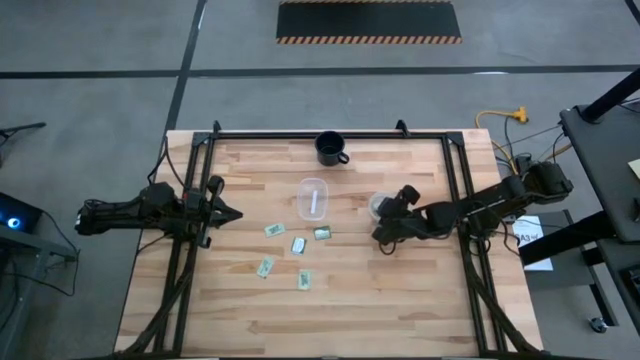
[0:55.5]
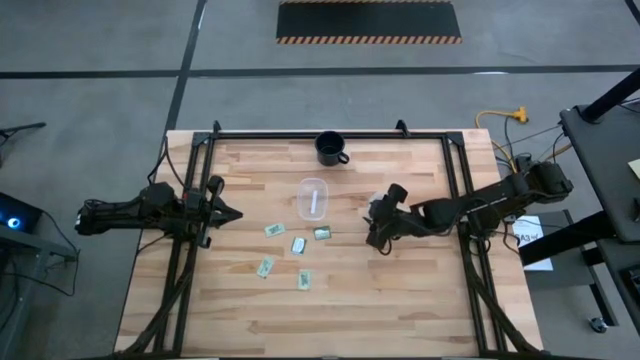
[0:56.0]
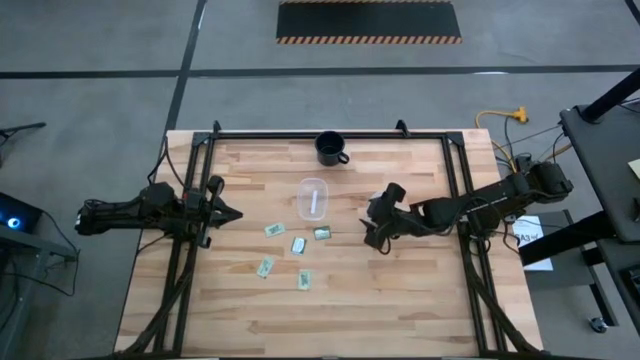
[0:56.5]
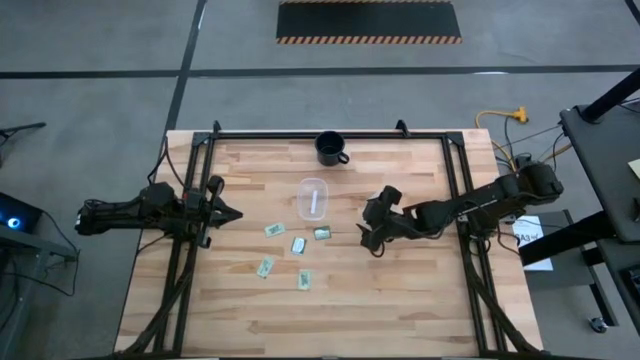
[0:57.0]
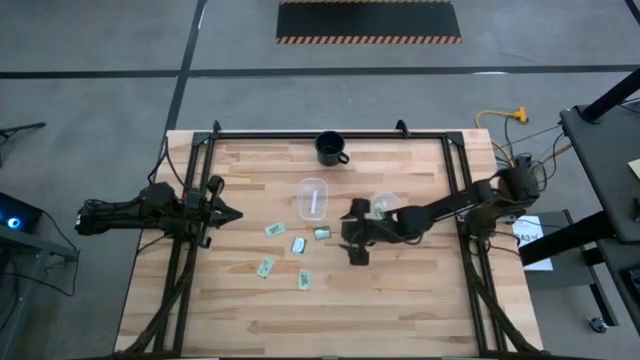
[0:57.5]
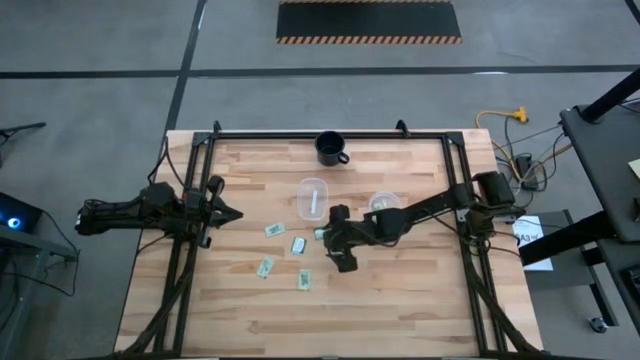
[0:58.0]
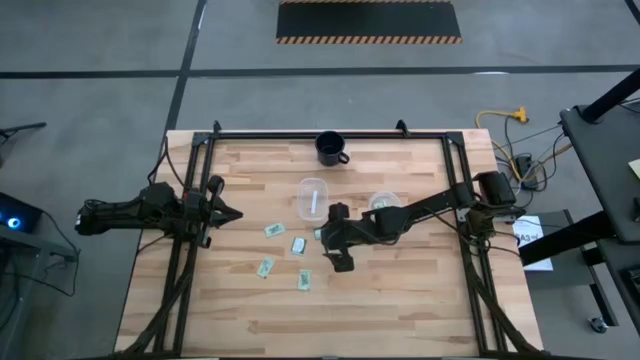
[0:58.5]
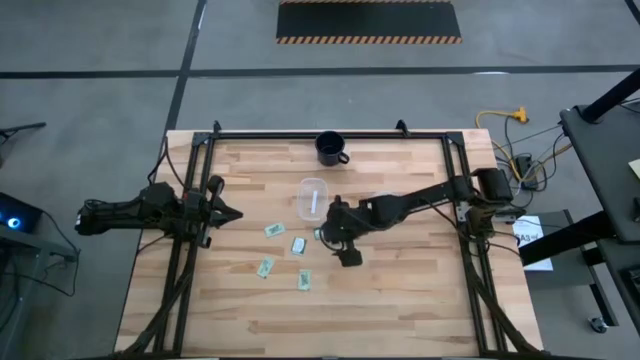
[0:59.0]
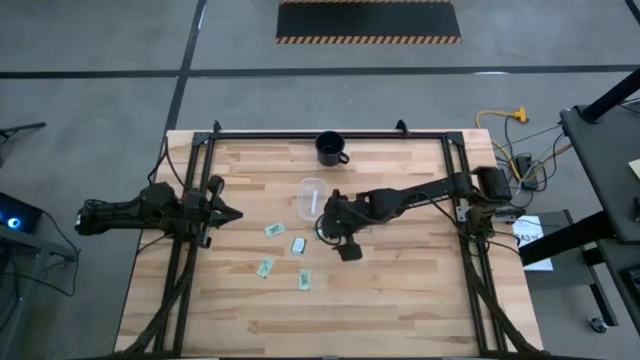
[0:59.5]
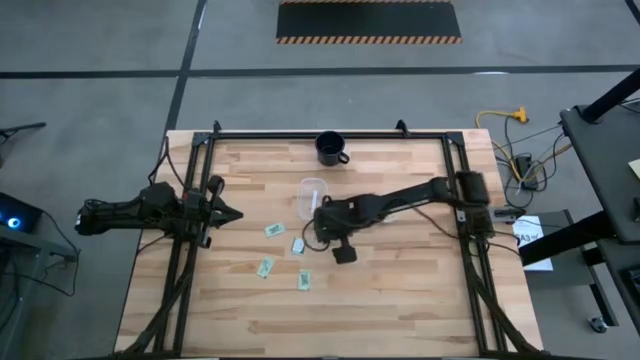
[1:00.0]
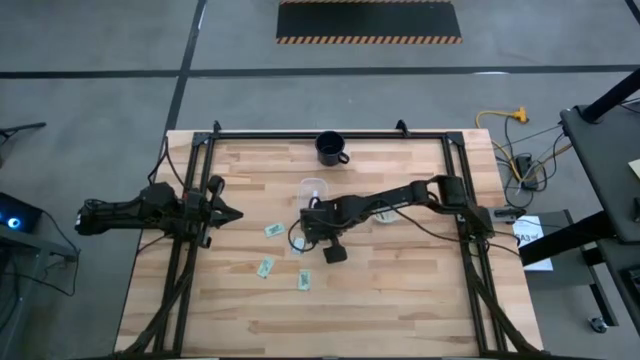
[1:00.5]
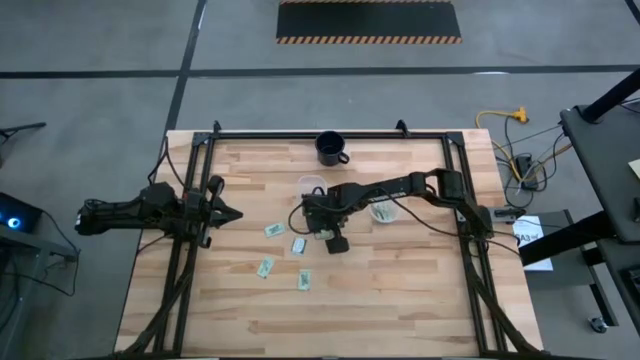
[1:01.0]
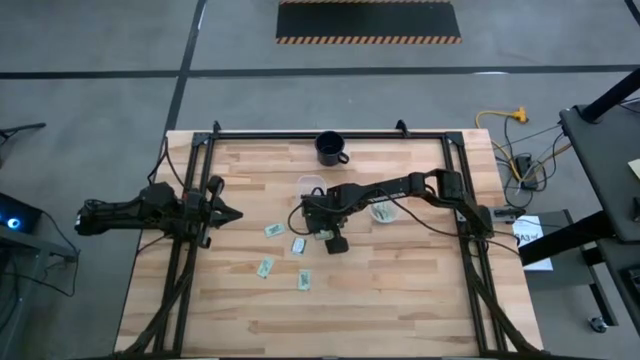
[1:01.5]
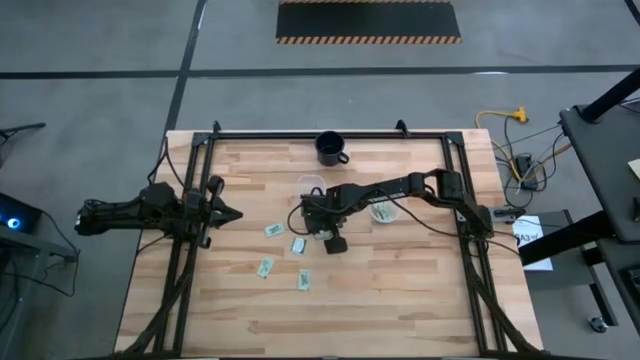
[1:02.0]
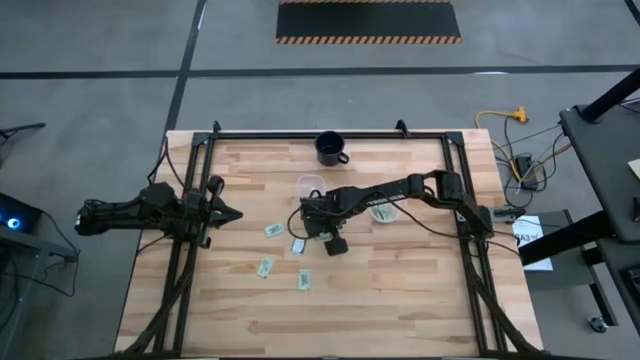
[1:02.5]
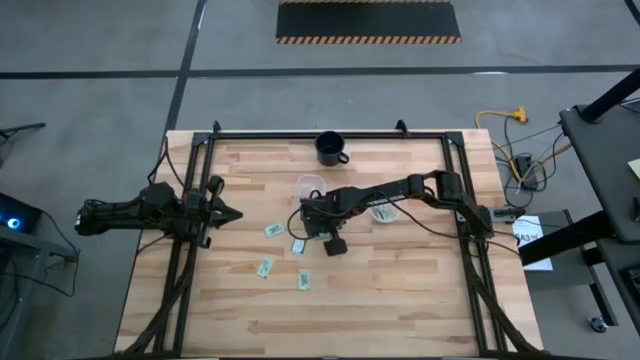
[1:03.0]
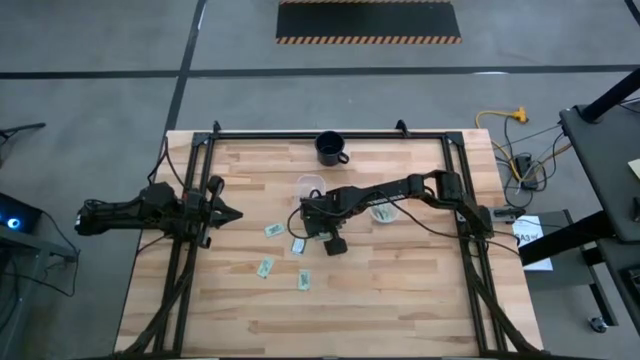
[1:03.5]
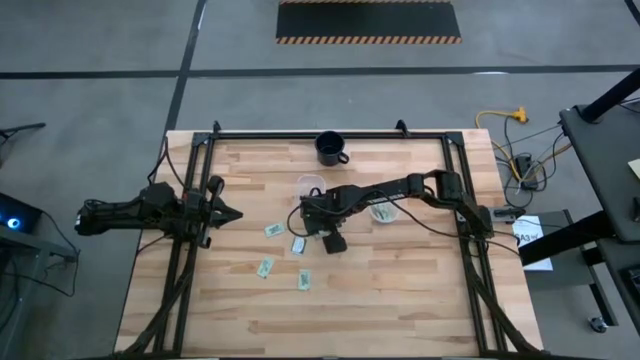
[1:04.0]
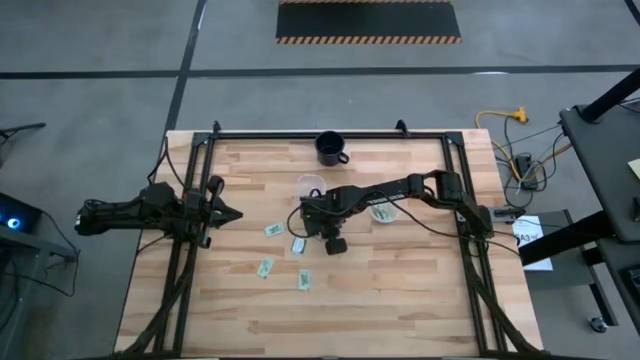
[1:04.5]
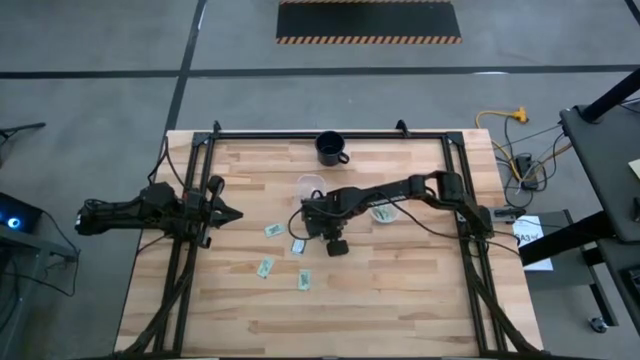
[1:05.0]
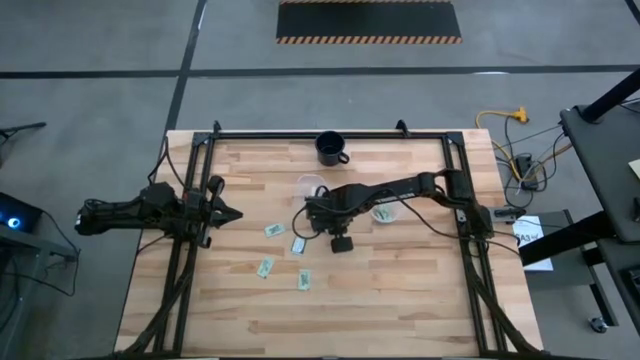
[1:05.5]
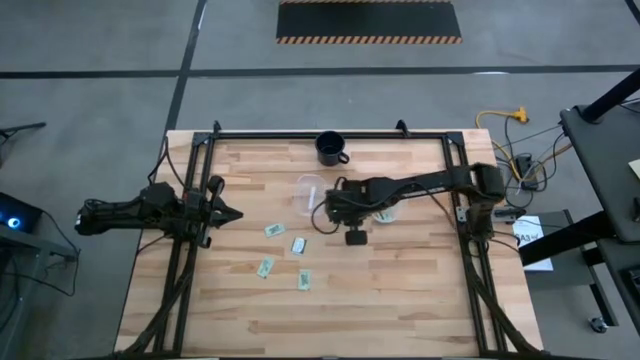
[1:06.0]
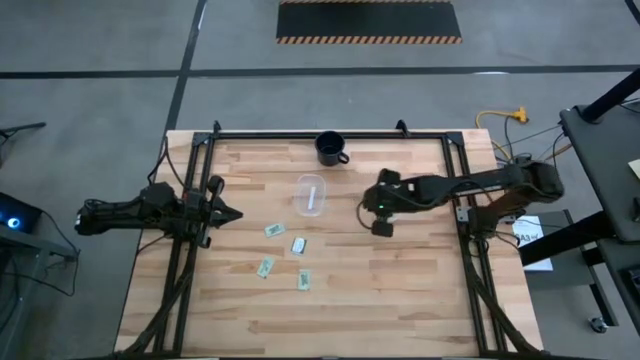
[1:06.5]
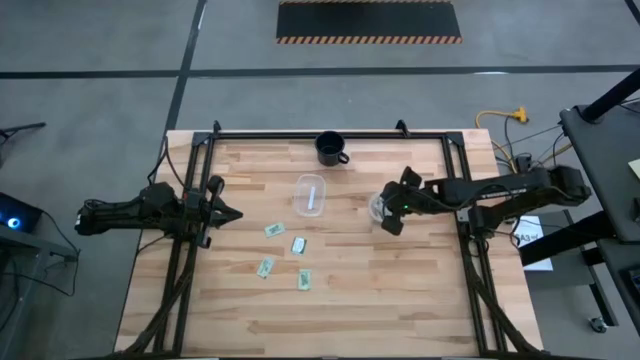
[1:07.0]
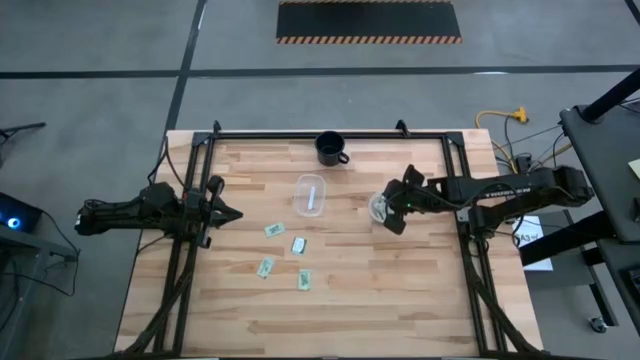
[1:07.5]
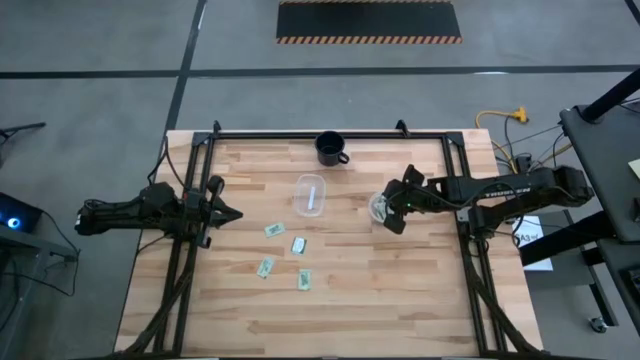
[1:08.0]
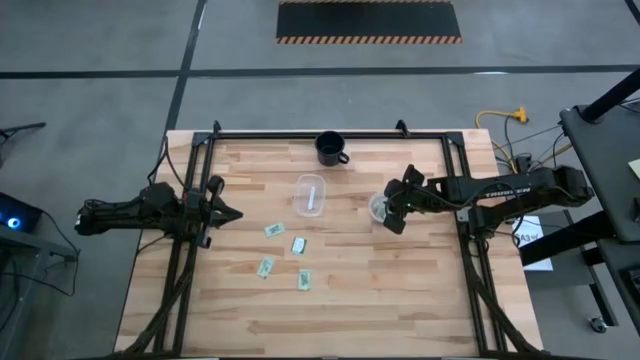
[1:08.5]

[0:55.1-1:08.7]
Task: Pick and place items into bin
Put the green stevia packet into the right transparent bin
